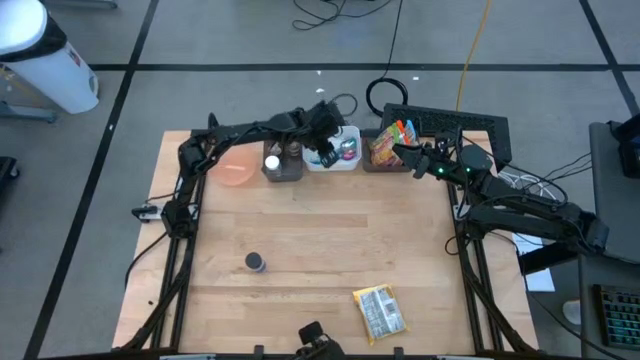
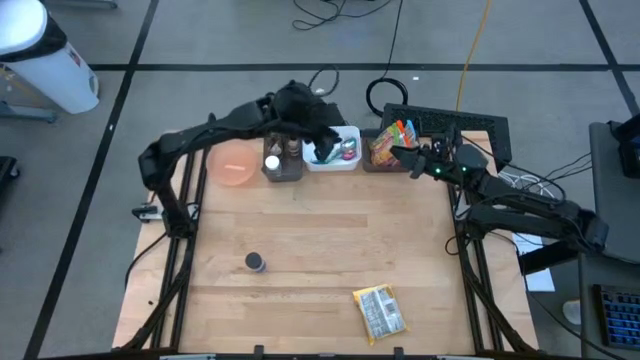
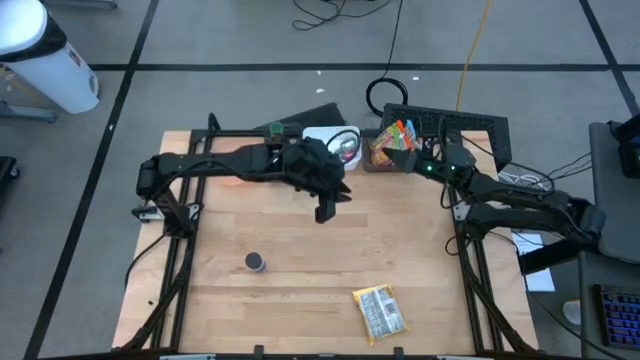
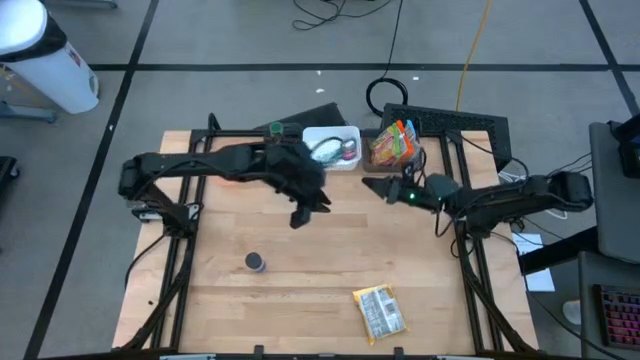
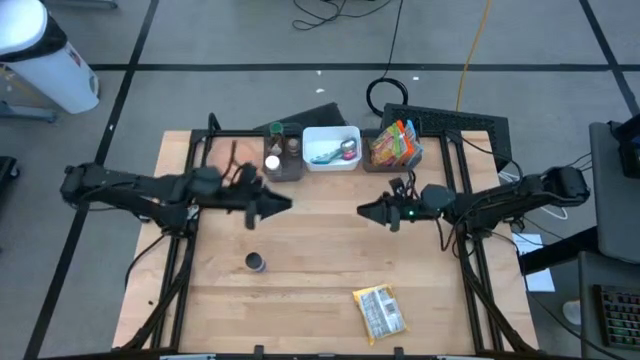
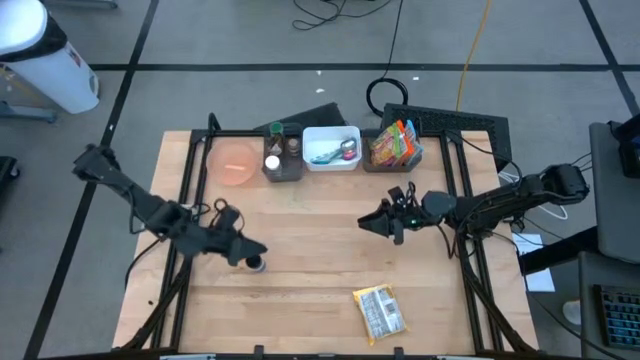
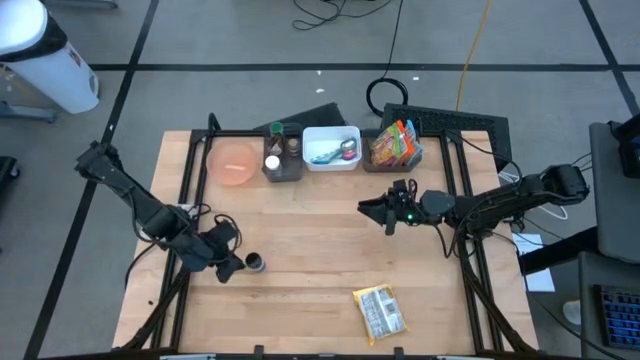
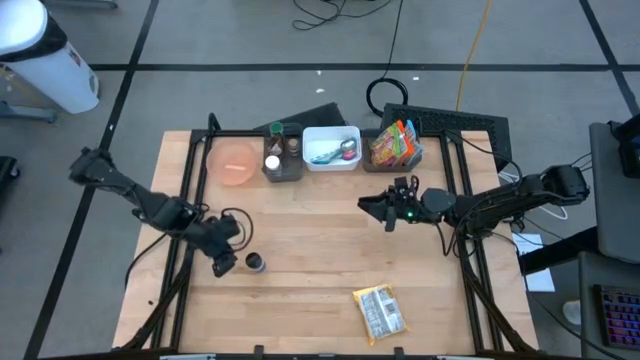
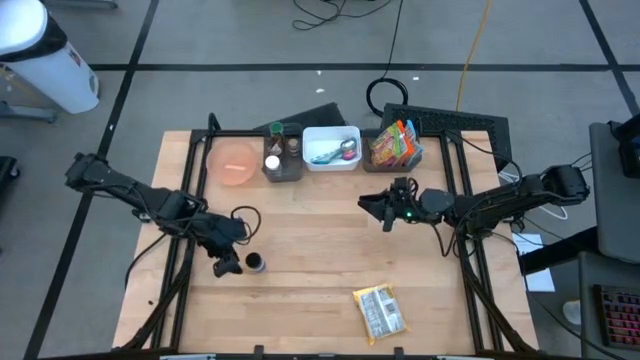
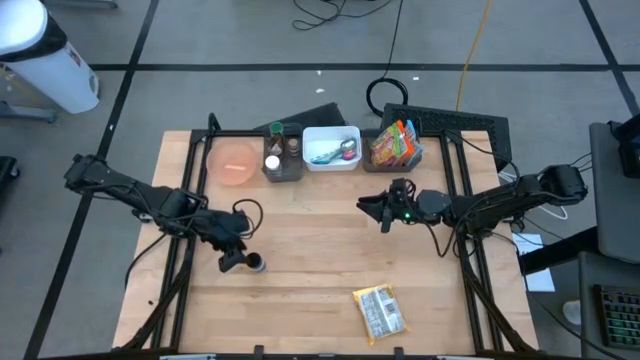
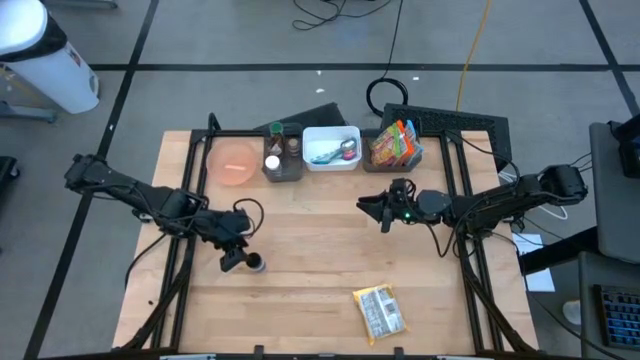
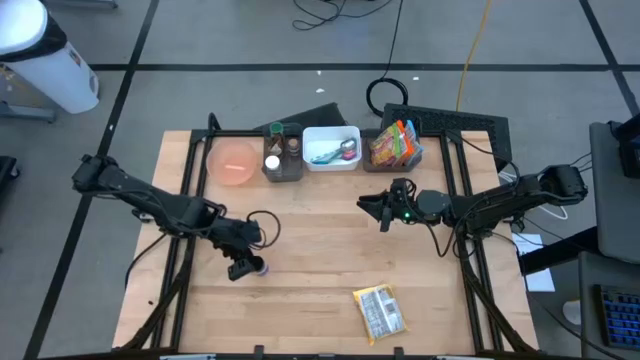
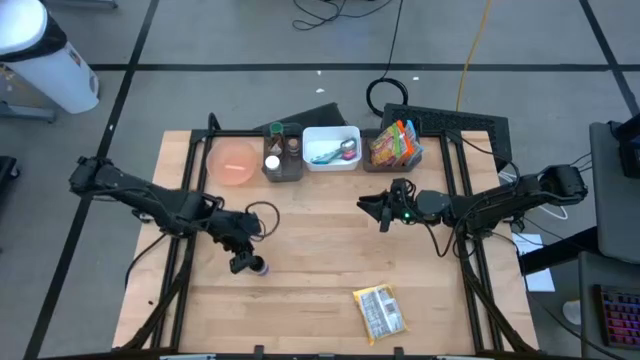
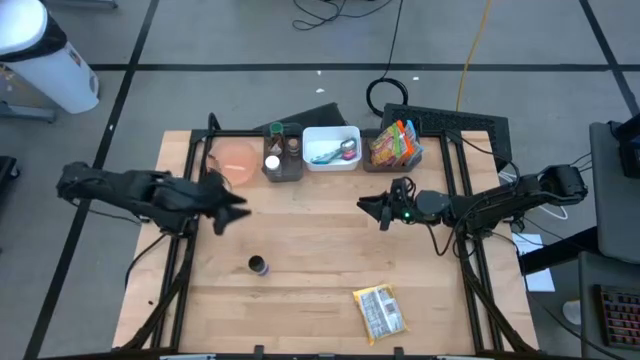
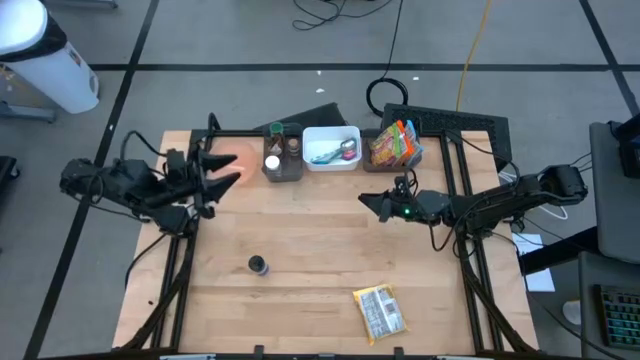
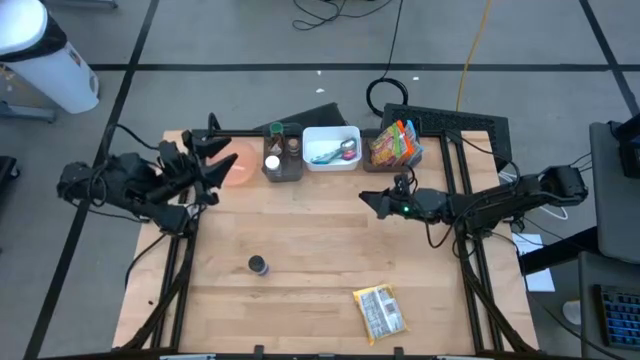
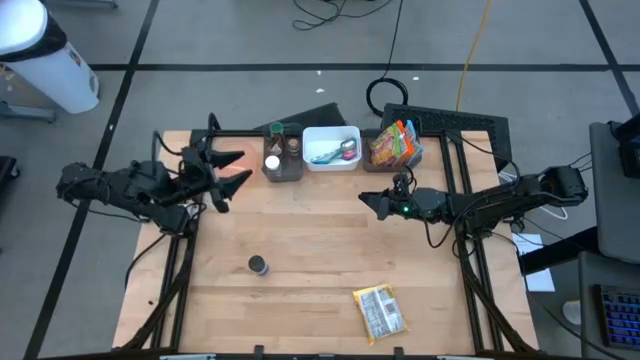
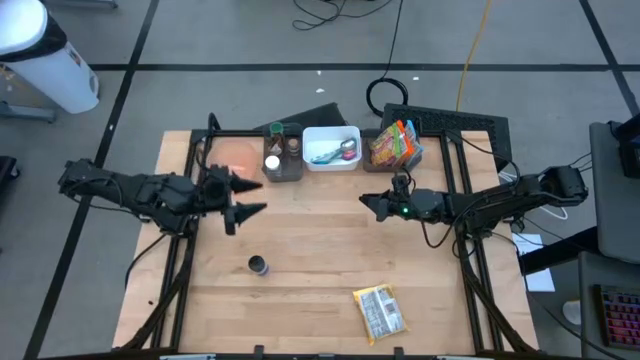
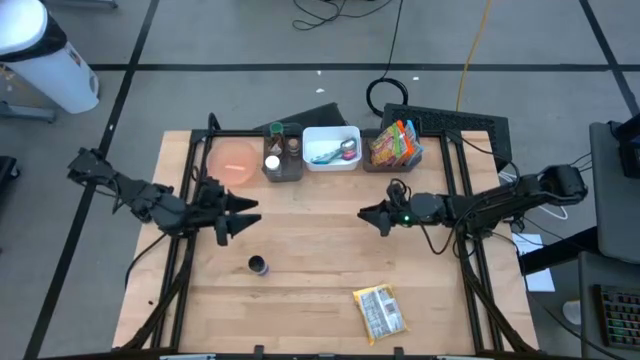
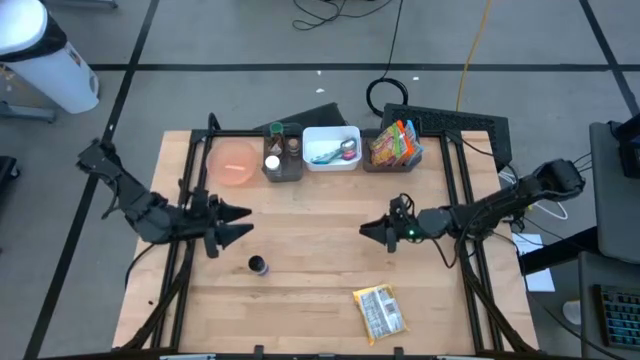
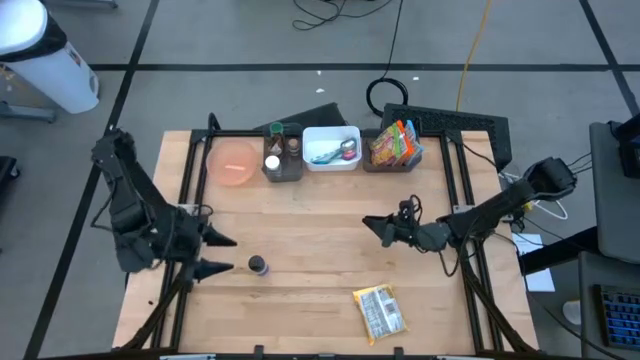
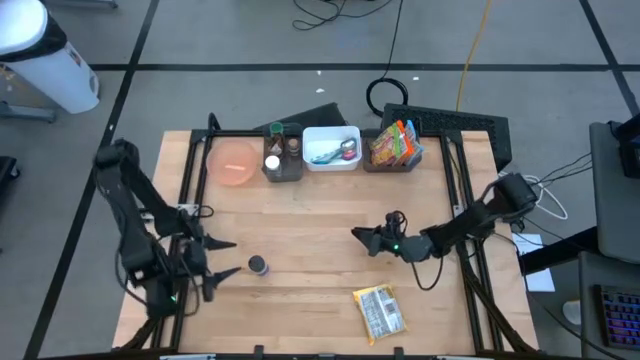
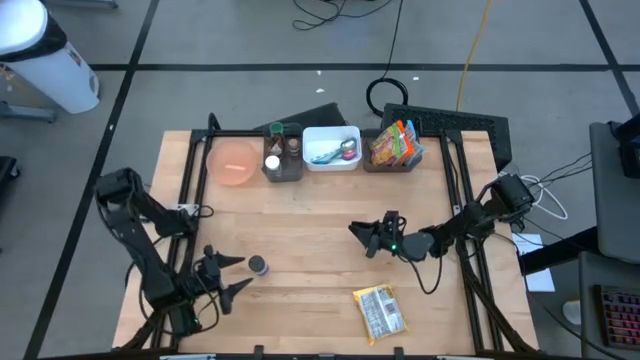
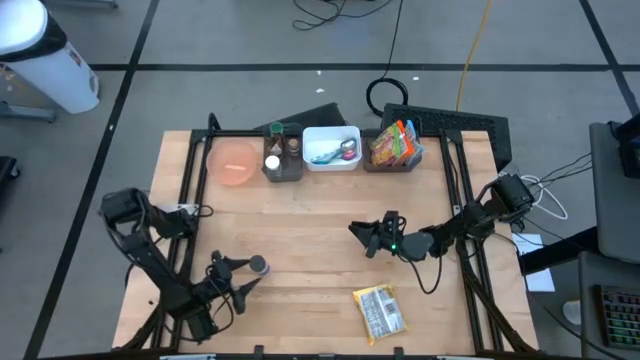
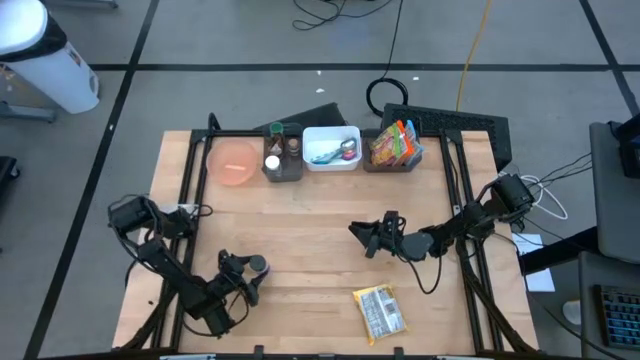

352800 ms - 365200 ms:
Task: Pick & Place Food Item
Put the black seasoning bottle into the left black bin

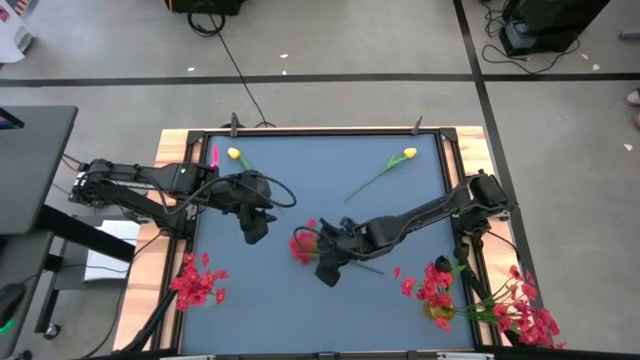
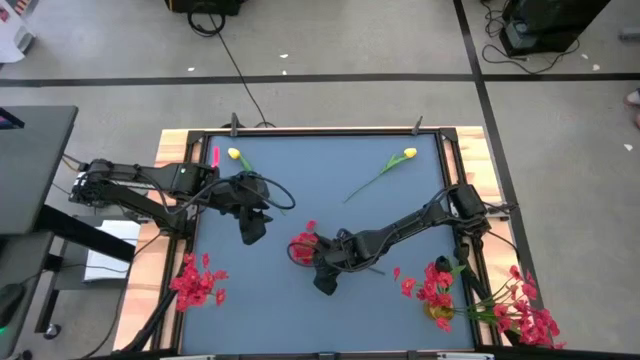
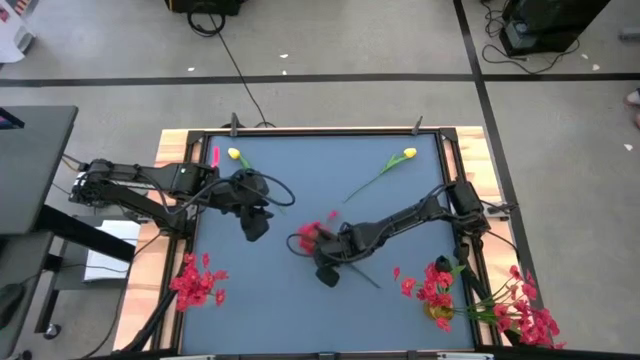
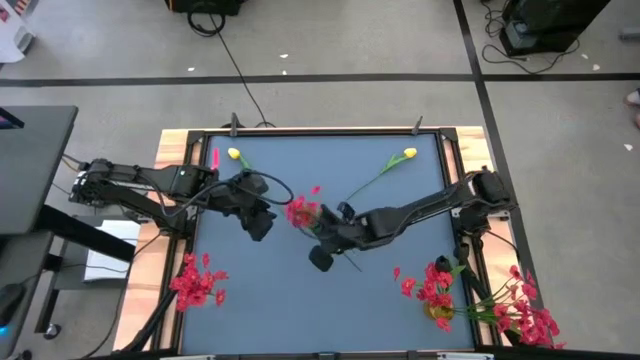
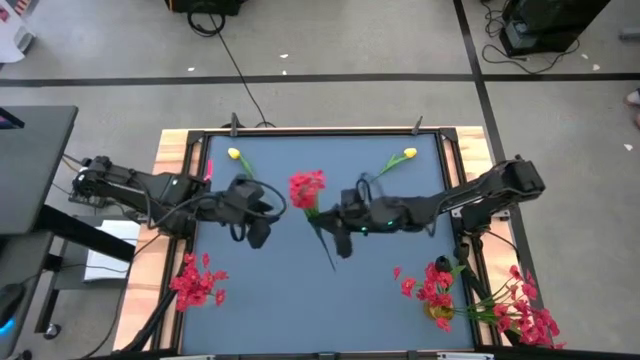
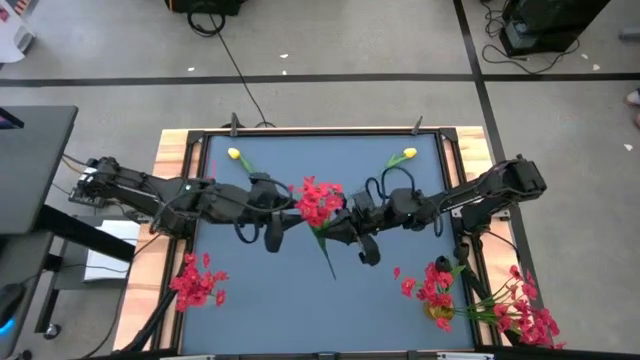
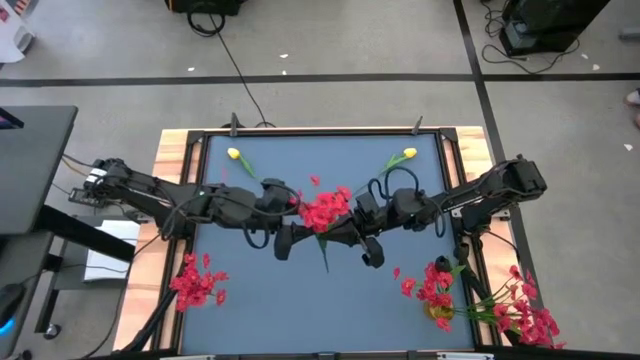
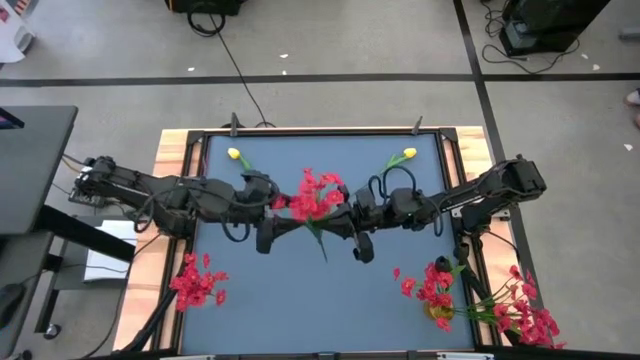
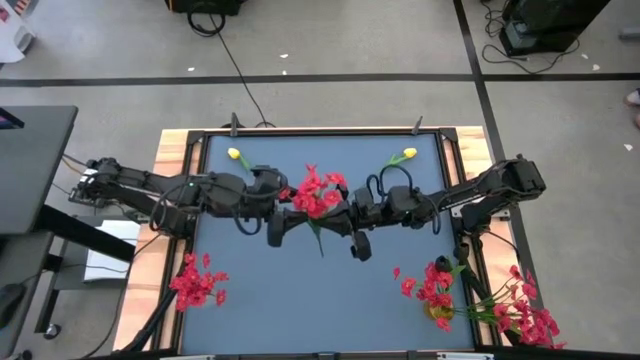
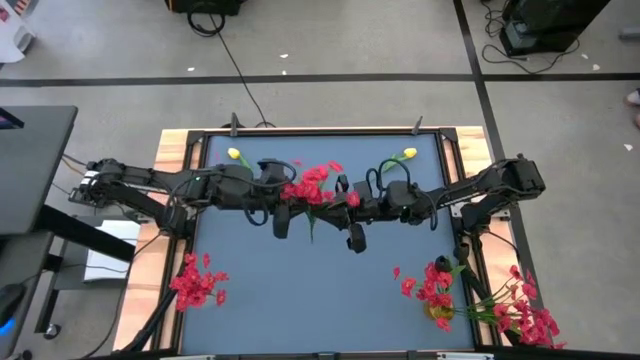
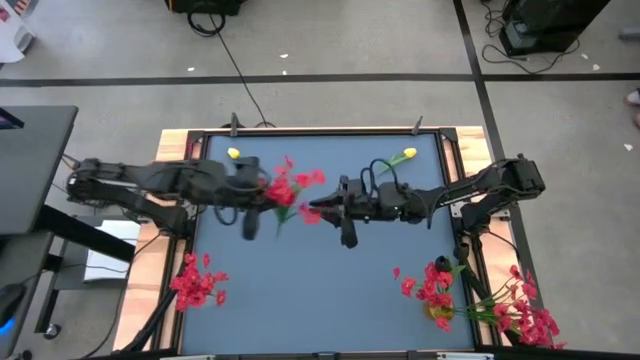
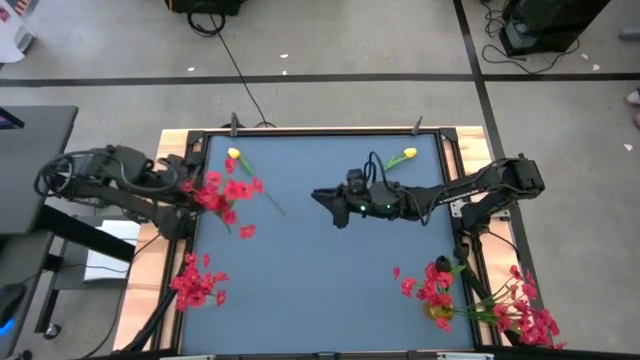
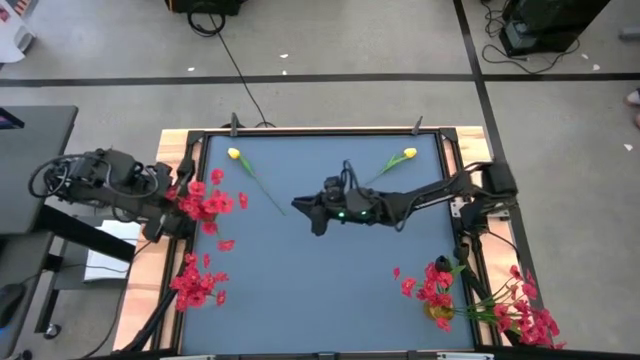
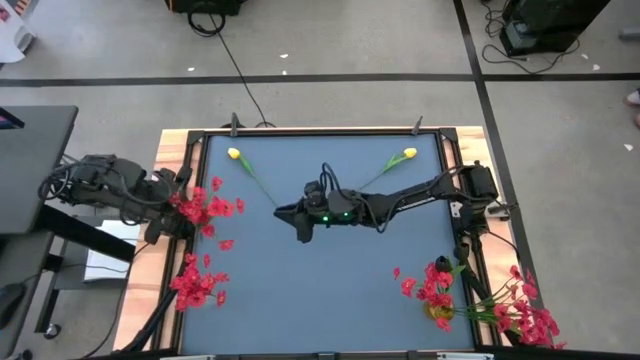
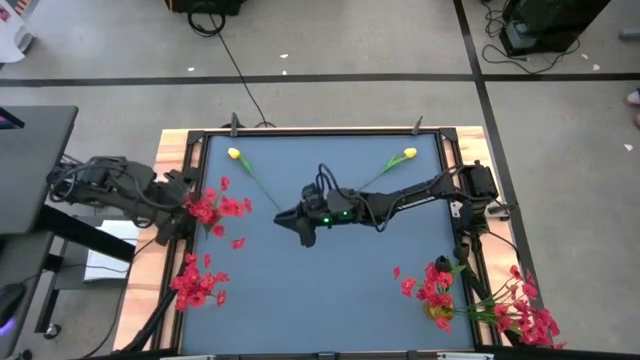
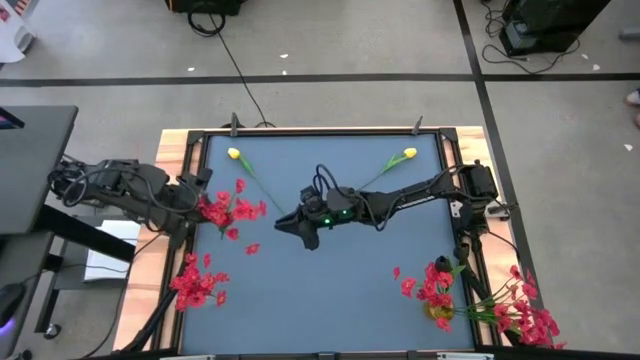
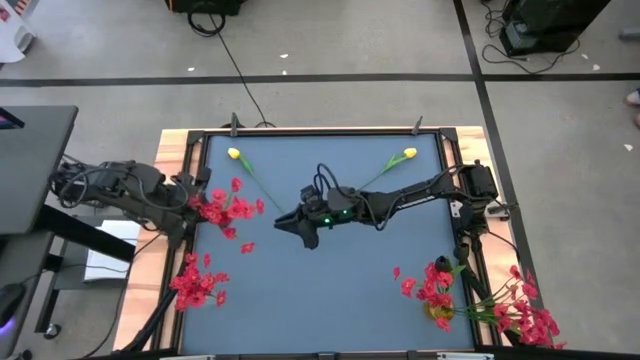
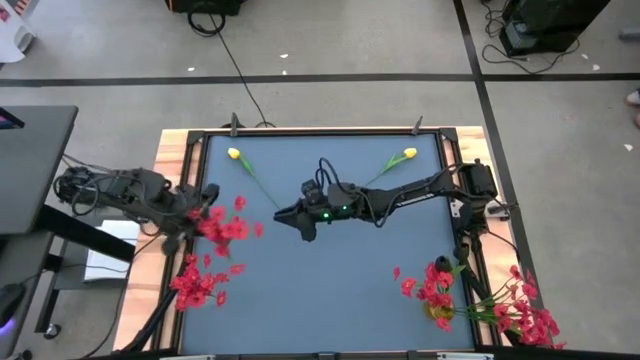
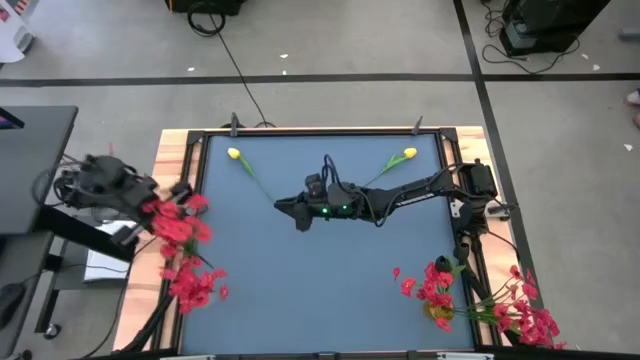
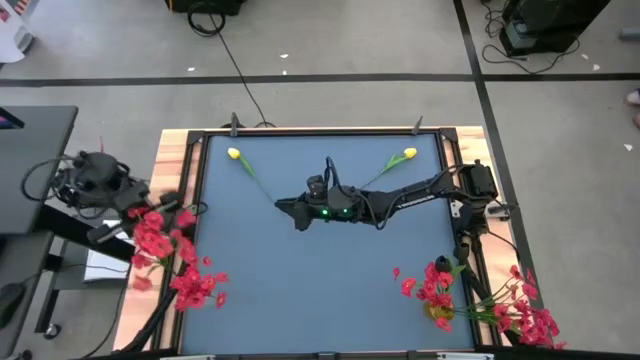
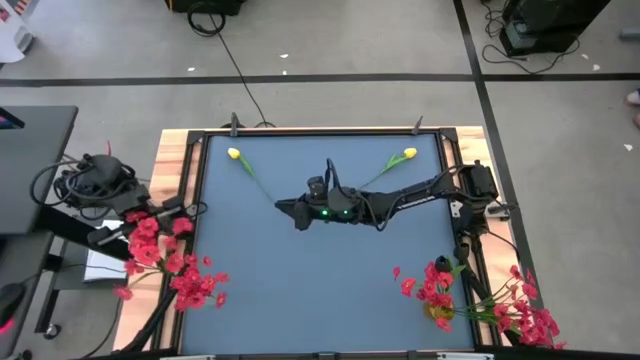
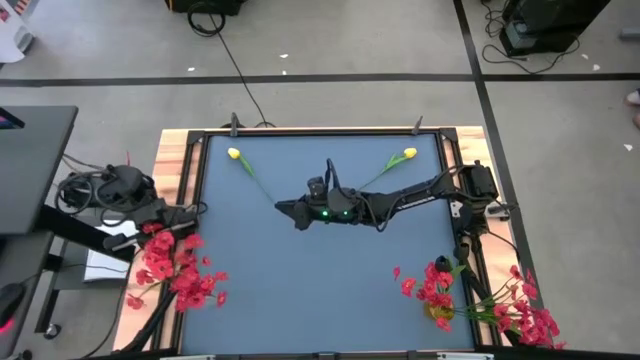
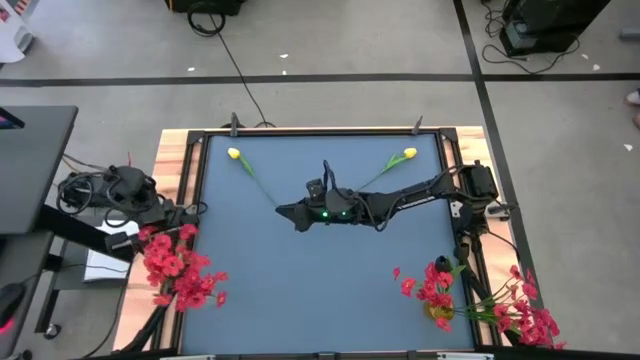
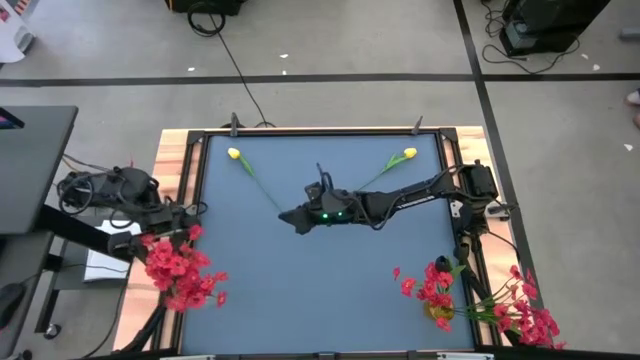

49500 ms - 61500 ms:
Task: Sort flowers into vase by color
Put the red flowers into the transparent vase
